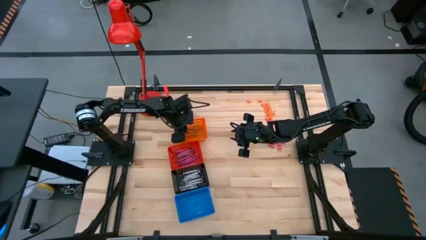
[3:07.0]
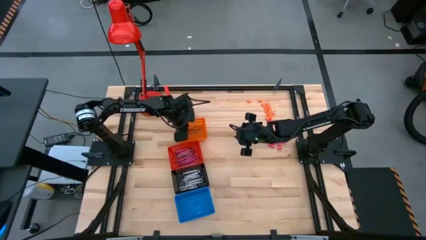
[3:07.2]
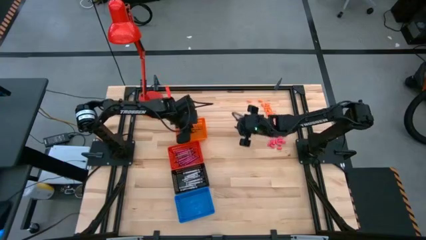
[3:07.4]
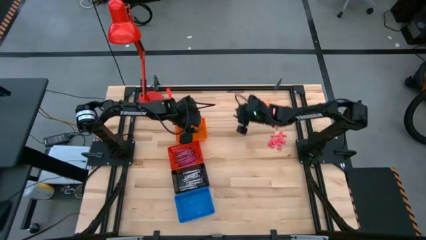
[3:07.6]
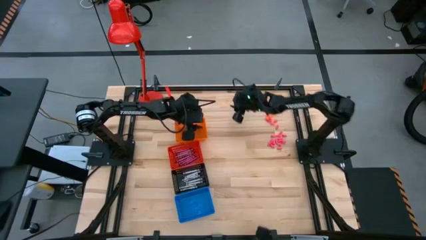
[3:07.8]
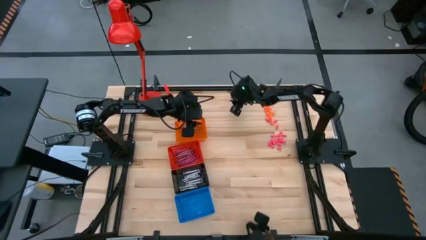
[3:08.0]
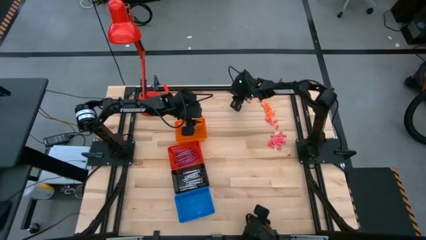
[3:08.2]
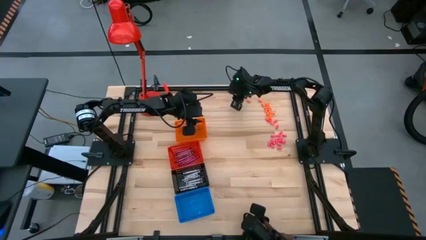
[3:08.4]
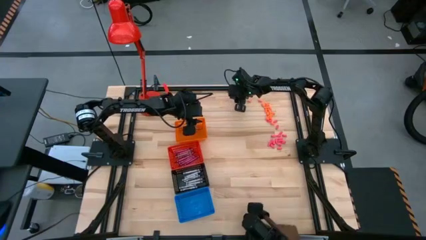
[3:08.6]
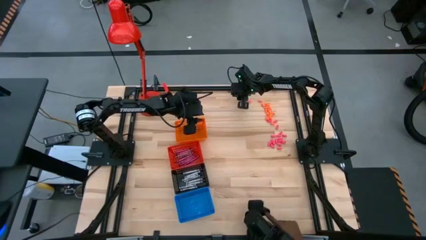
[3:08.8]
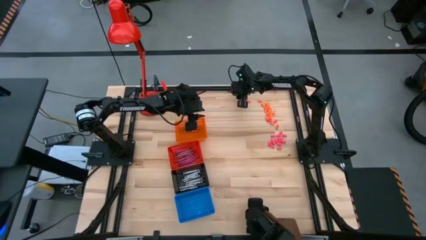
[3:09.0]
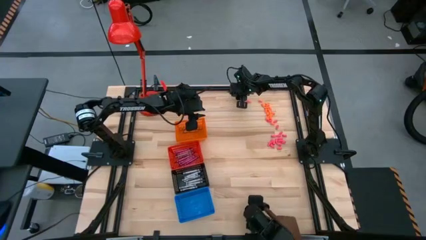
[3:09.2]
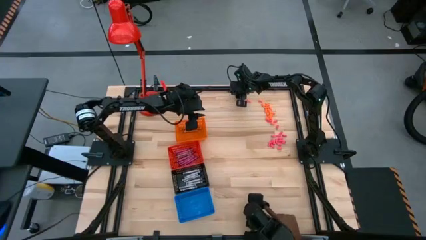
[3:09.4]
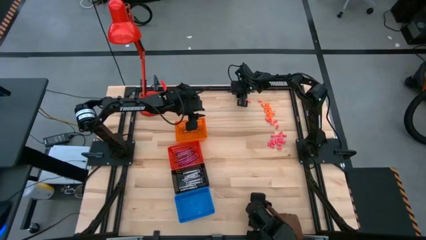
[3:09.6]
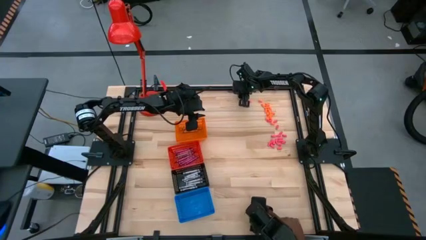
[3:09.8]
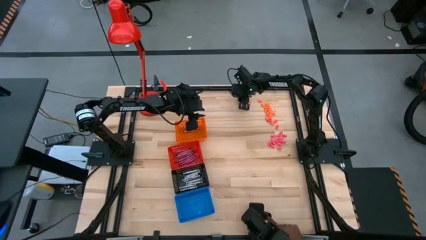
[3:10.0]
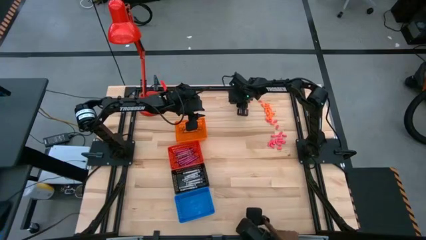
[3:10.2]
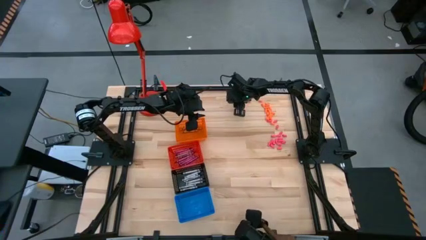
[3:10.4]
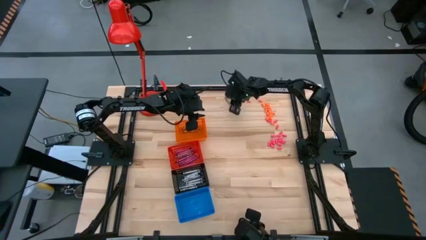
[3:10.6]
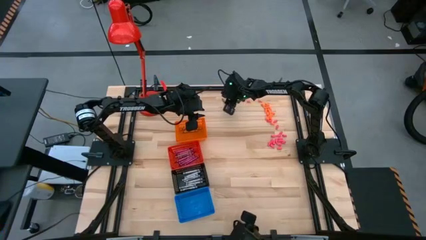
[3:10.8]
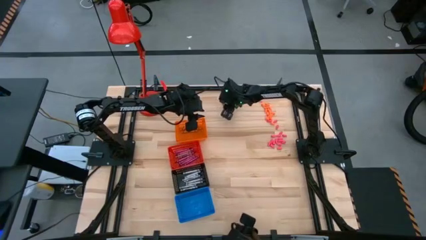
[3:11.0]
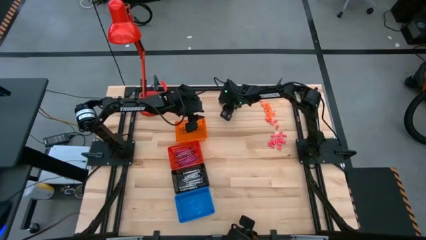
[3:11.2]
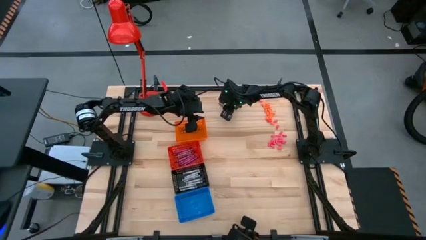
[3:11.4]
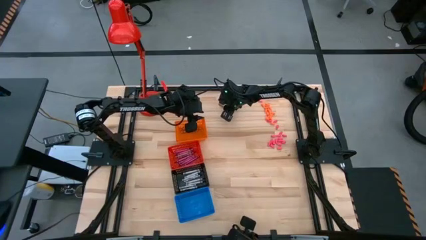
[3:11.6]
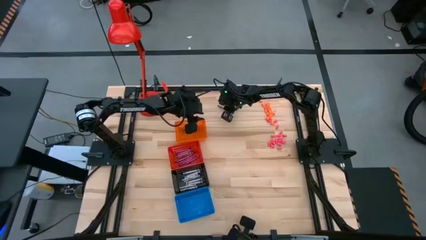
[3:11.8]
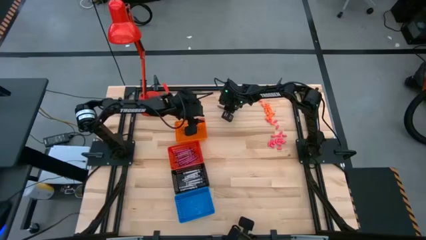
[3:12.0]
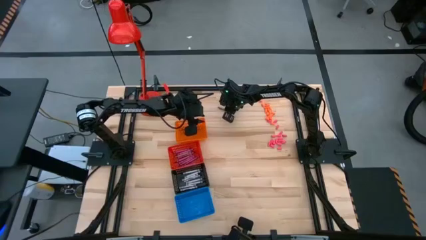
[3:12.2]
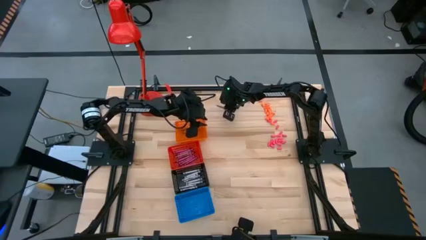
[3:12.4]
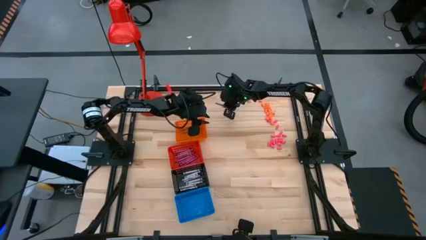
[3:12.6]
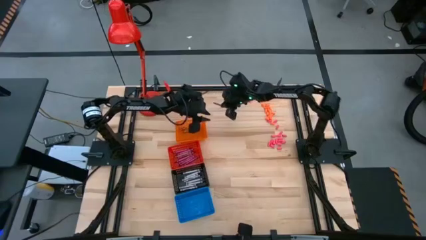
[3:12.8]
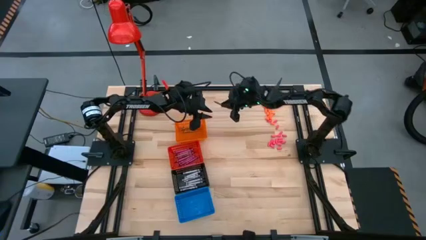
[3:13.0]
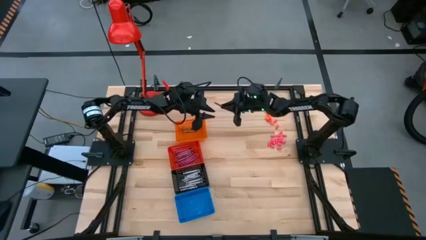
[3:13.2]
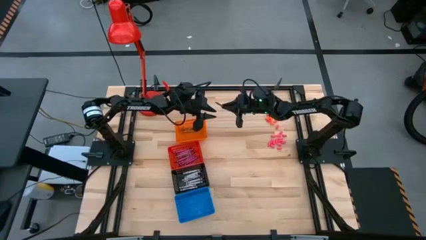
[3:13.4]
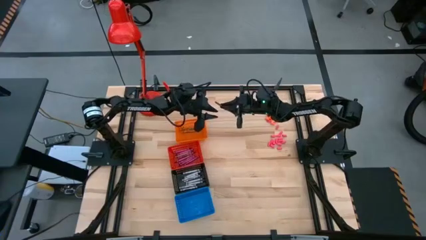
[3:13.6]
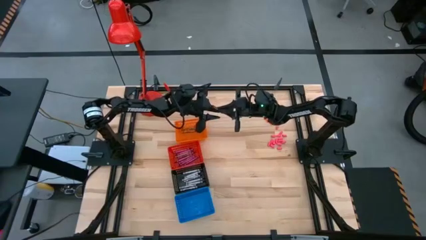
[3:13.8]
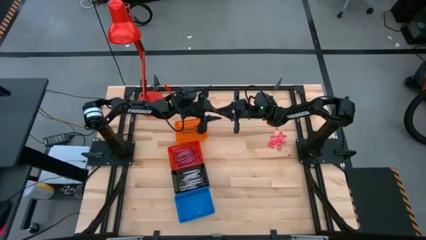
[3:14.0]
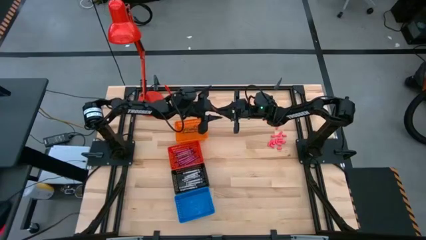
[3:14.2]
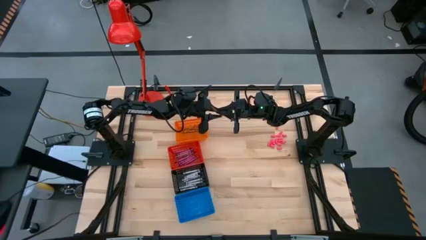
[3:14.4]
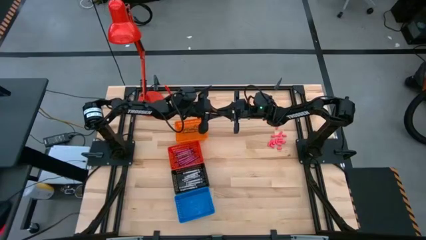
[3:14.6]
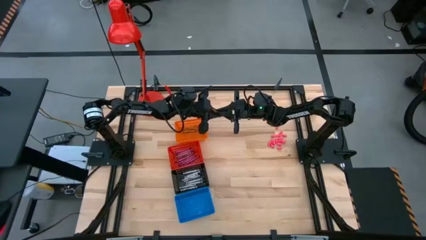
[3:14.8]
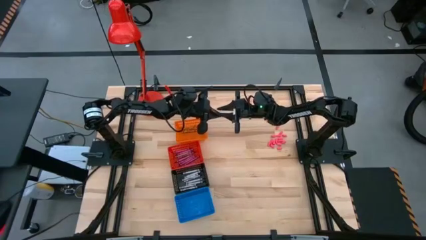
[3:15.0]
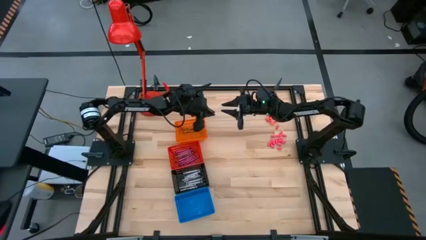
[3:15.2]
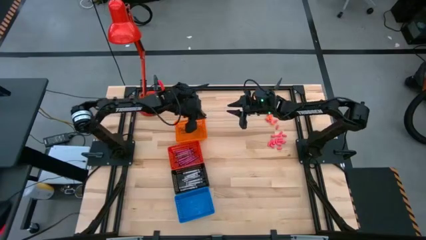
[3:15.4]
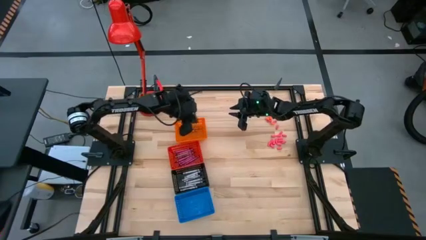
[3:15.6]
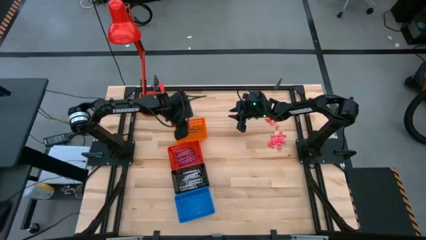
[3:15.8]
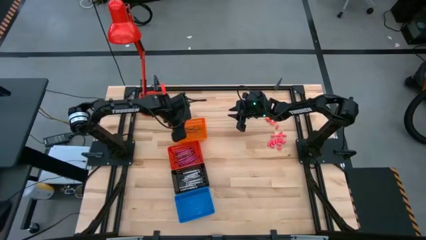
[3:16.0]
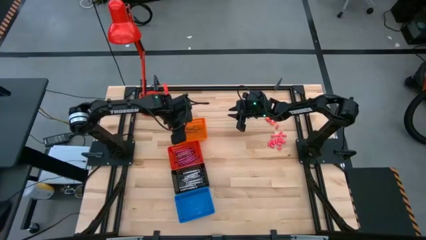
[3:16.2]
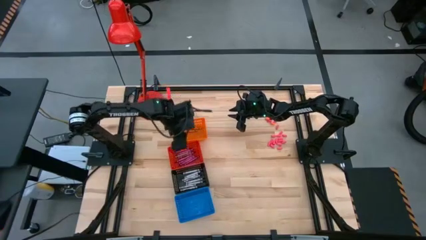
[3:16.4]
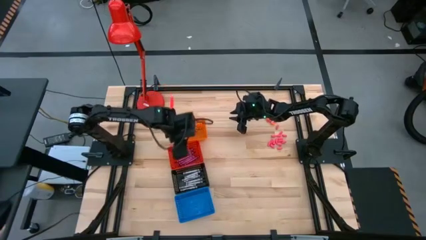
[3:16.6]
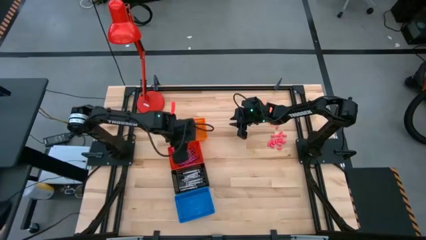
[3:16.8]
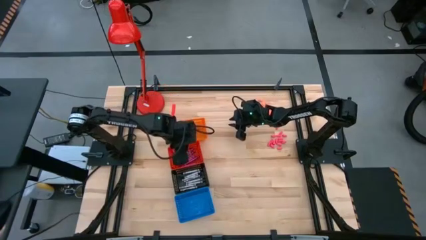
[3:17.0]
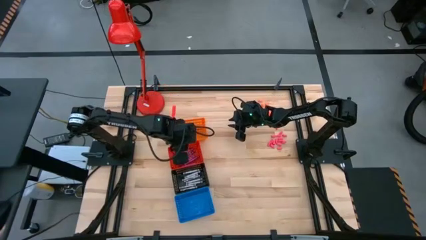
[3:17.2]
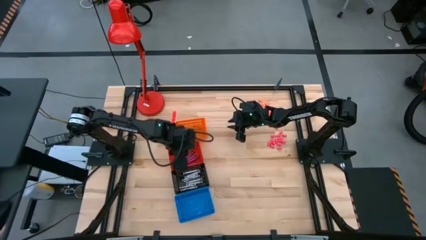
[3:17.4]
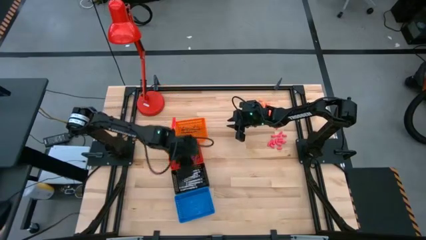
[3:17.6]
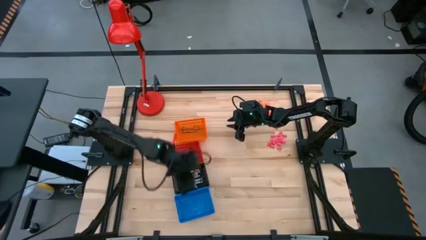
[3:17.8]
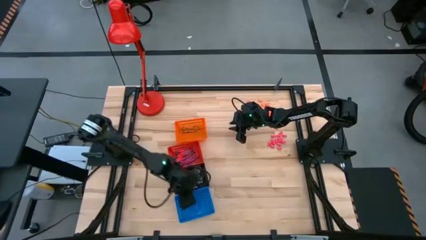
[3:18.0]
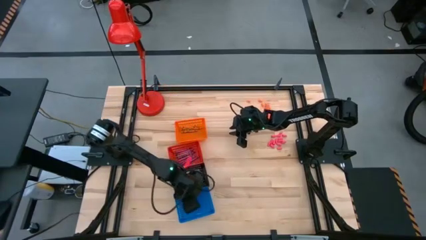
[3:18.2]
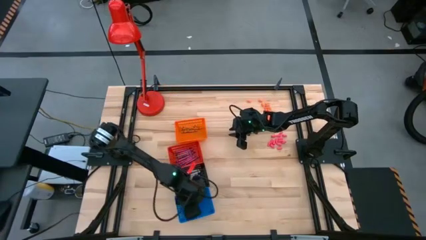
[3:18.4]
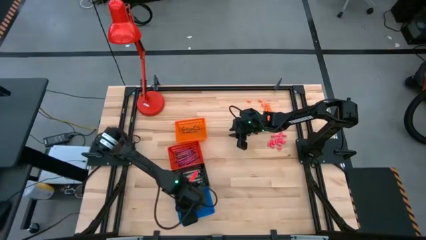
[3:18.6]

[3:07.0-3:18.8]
Task: Sort crayons
Put the brown crayon into the blue basket

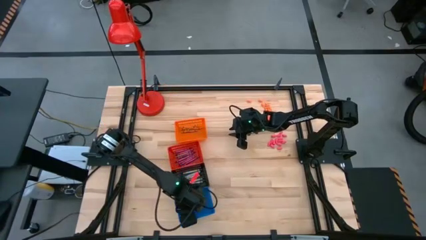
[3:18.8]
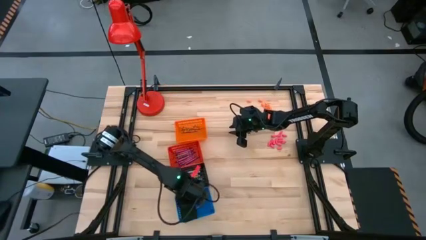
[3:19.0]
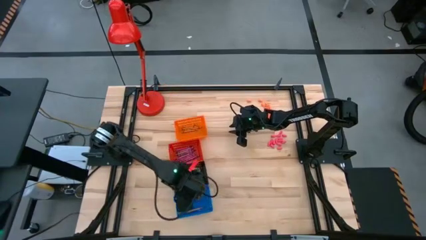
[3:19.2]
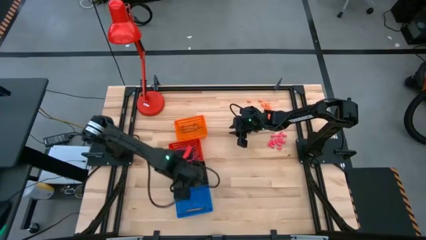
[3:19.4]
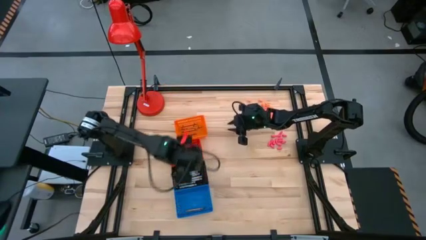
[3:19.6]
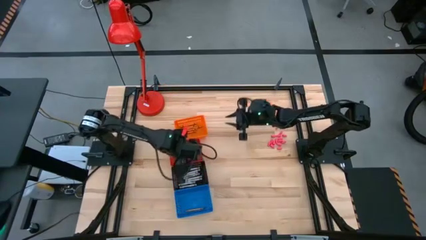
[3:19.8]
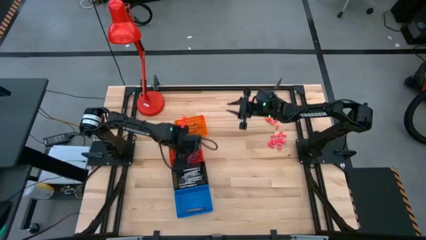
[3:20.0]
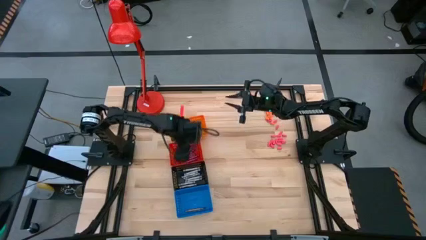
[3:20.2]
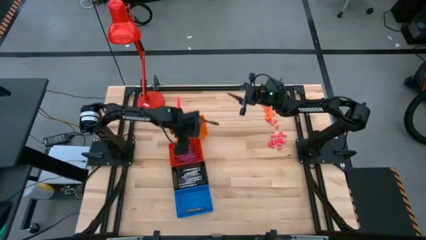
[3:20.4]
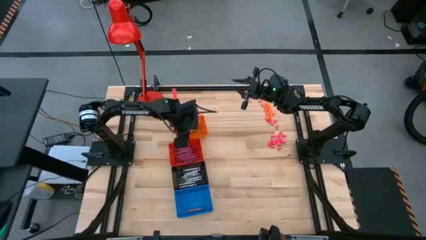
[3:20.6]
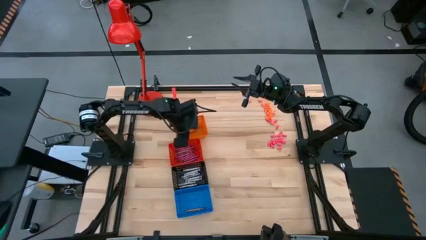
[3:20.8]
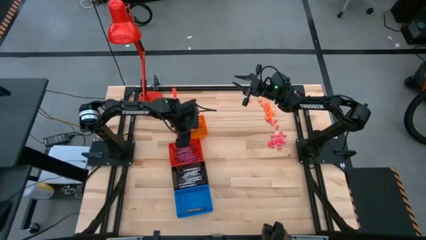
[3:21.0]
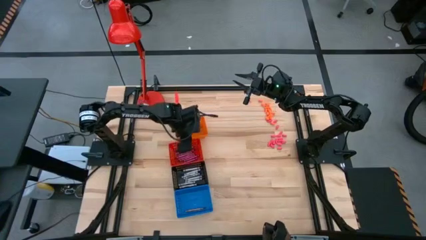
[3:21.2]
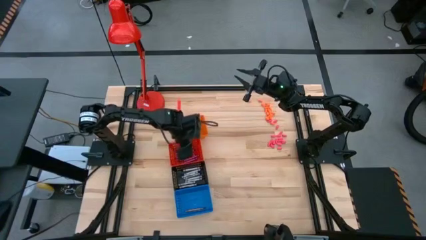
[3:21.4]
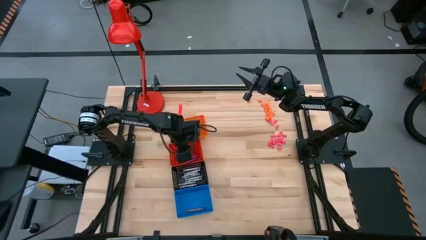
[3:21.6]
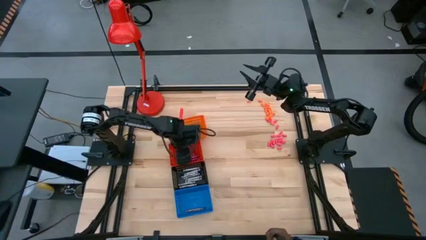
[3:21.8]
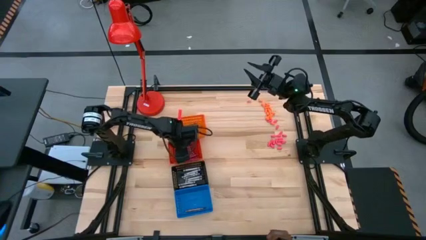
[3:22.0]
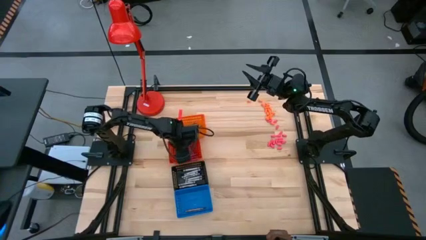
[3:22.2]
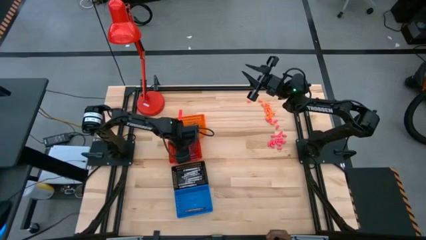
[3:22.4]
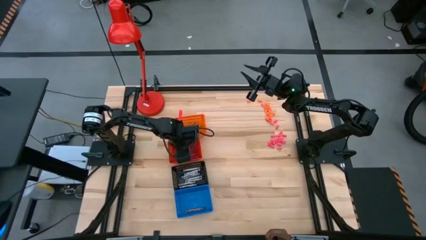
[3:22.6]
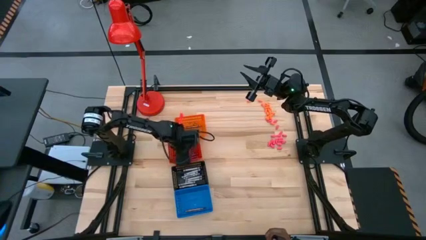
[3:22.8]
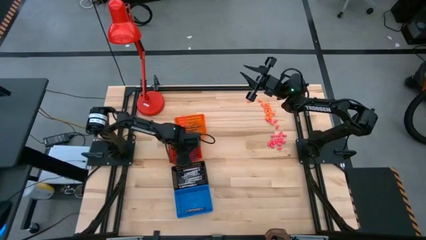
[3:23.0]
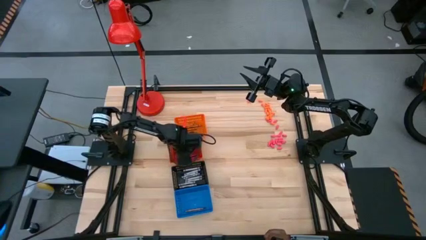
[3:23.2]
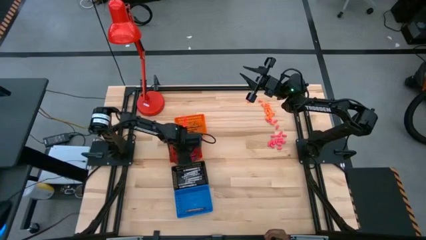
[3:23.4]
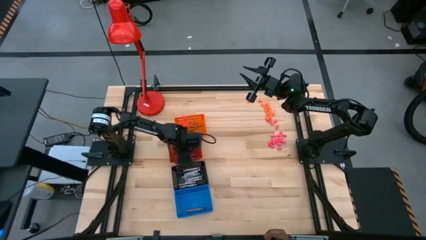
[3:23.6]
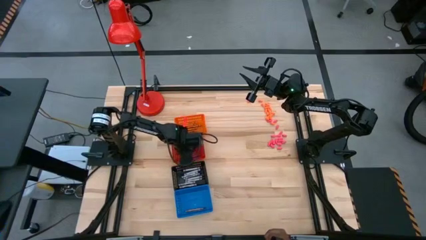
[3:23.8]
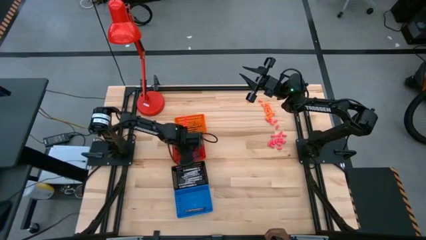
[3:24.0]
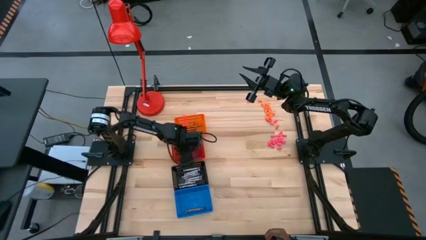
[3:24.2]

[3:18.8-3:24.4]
Put the brown crayon into the blue basket
